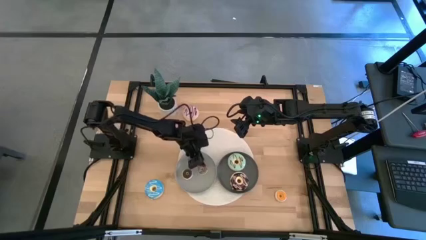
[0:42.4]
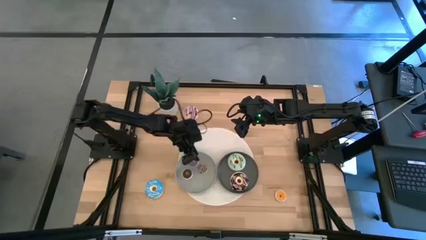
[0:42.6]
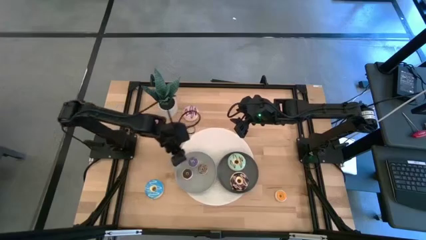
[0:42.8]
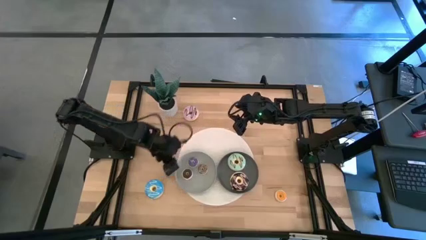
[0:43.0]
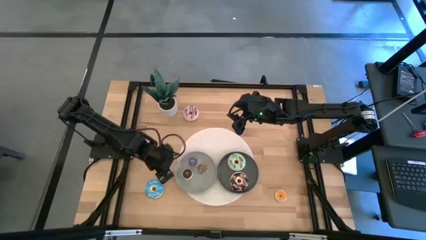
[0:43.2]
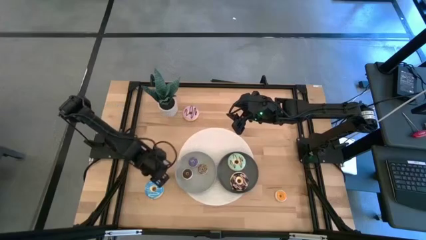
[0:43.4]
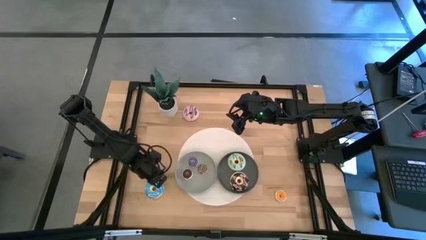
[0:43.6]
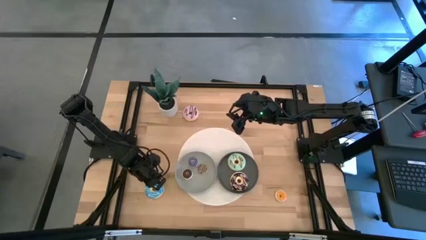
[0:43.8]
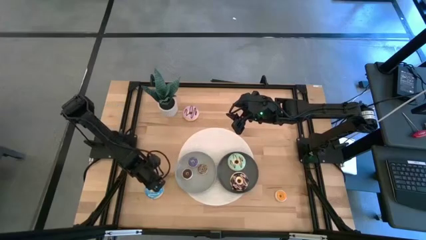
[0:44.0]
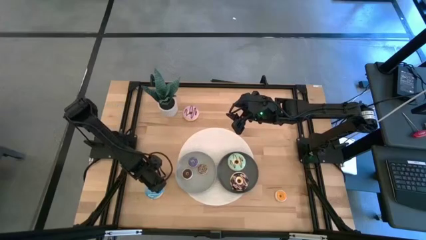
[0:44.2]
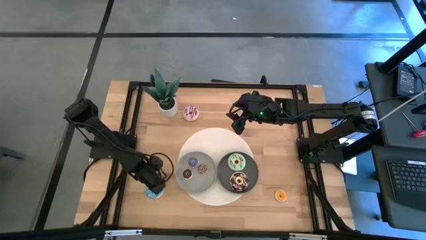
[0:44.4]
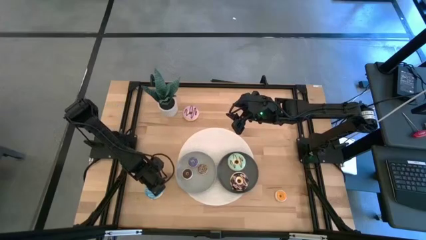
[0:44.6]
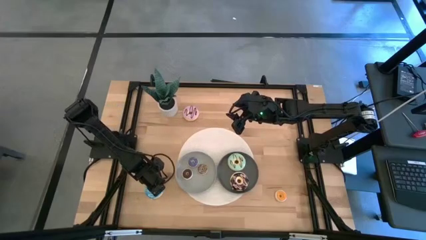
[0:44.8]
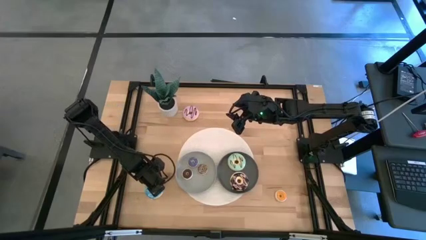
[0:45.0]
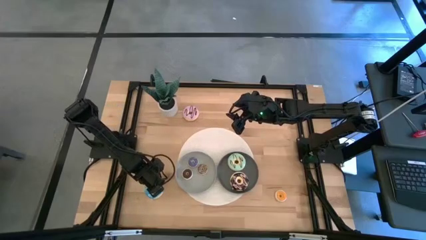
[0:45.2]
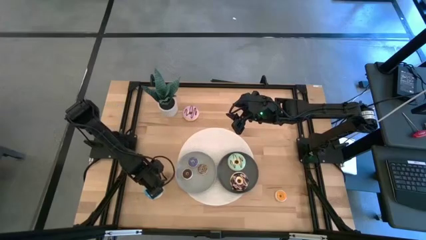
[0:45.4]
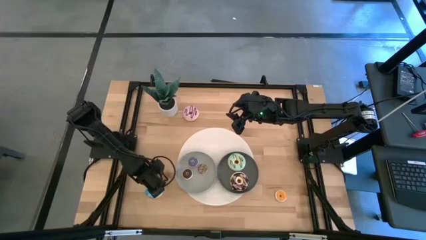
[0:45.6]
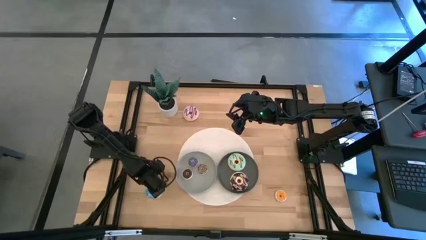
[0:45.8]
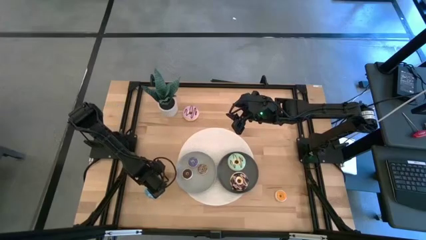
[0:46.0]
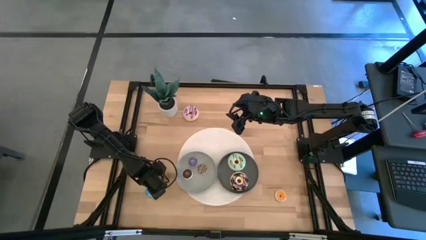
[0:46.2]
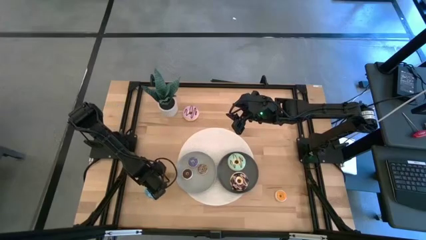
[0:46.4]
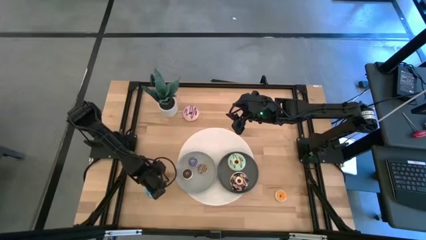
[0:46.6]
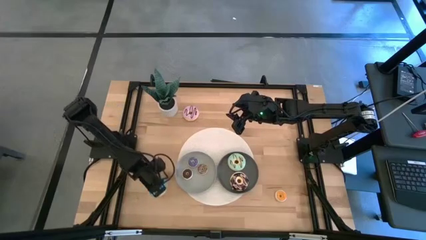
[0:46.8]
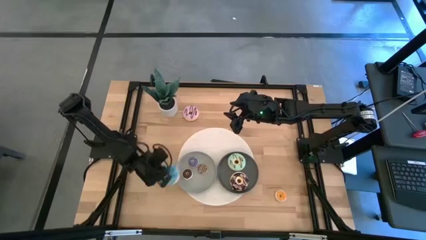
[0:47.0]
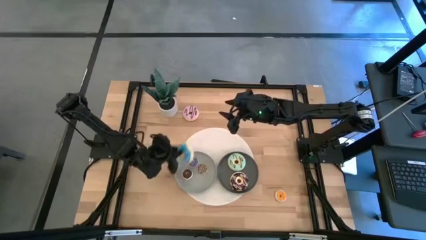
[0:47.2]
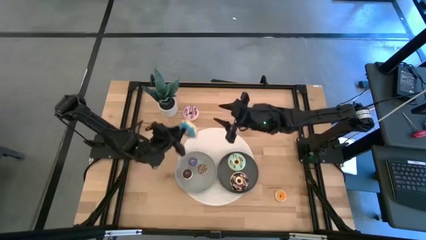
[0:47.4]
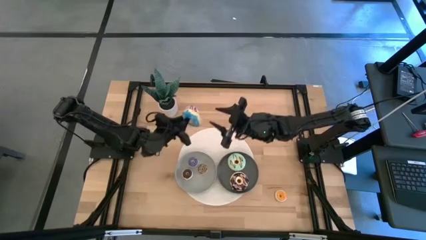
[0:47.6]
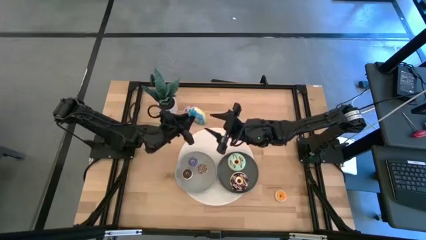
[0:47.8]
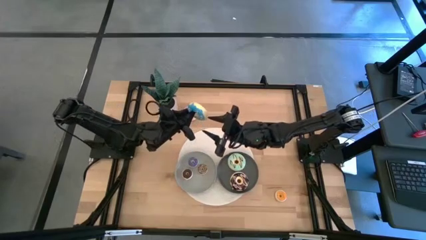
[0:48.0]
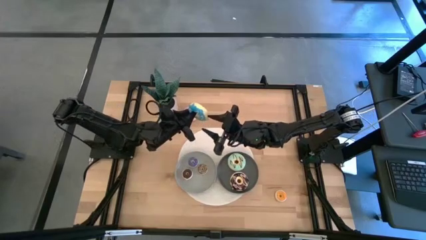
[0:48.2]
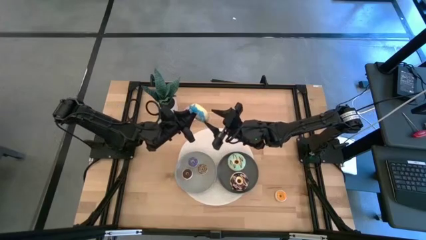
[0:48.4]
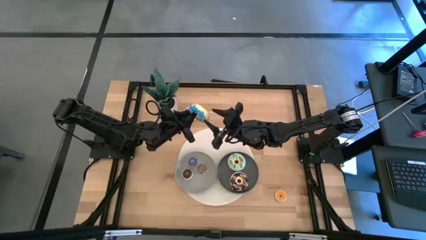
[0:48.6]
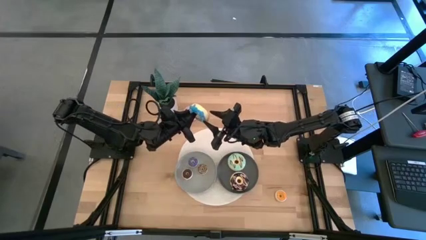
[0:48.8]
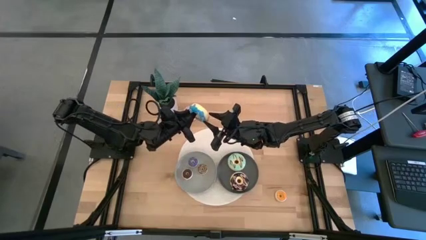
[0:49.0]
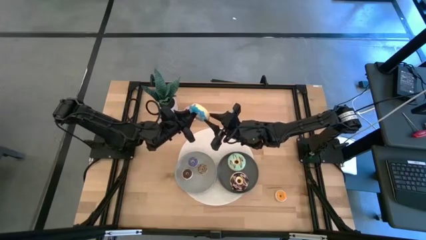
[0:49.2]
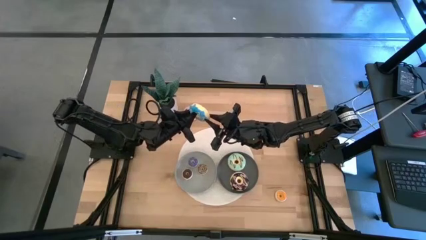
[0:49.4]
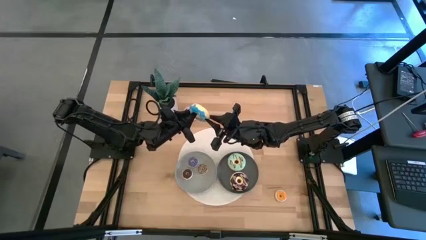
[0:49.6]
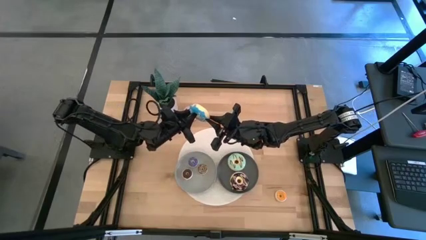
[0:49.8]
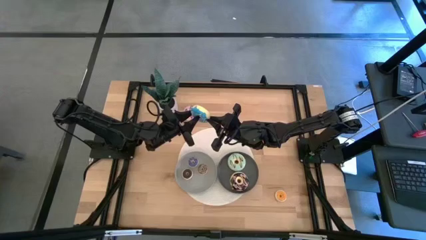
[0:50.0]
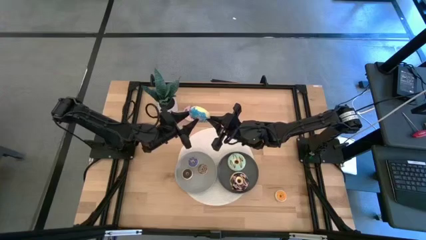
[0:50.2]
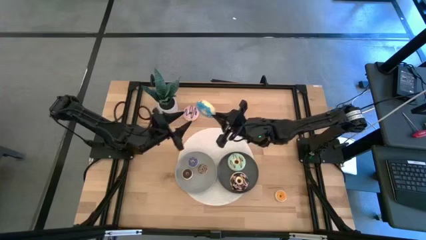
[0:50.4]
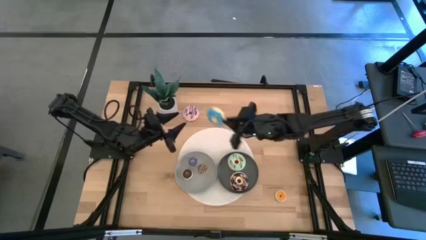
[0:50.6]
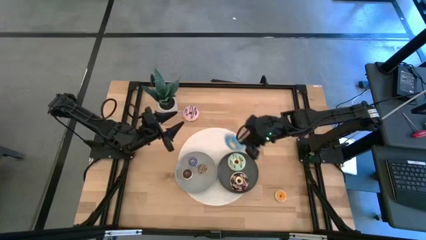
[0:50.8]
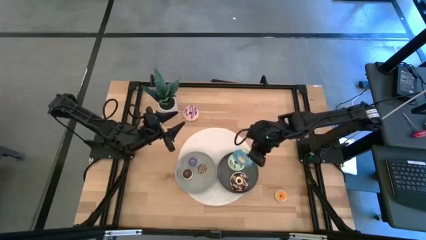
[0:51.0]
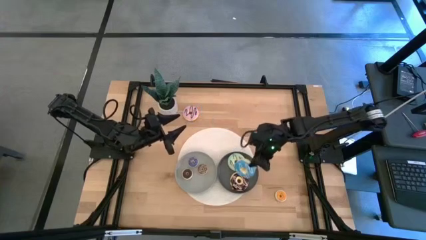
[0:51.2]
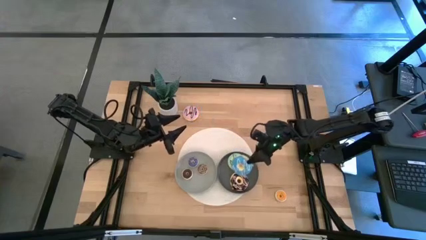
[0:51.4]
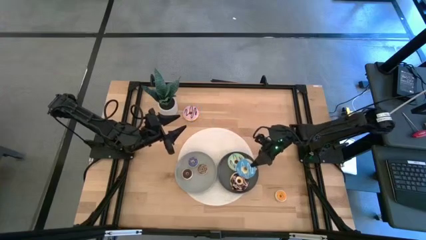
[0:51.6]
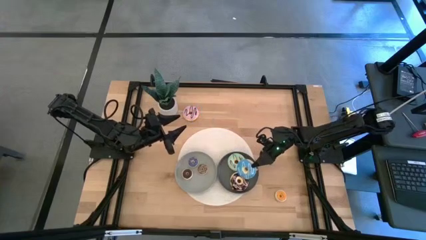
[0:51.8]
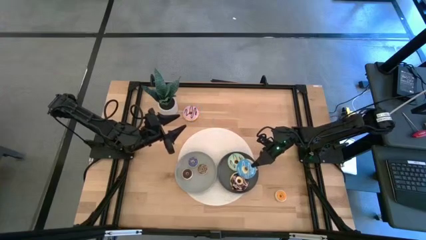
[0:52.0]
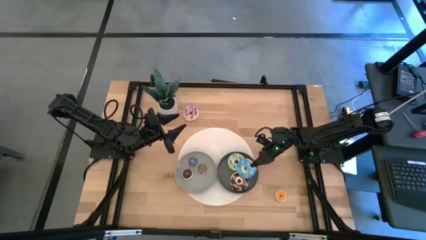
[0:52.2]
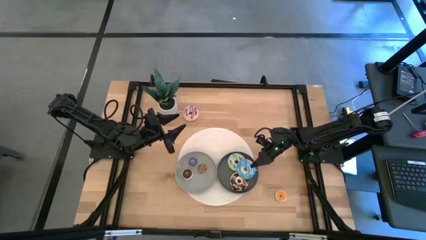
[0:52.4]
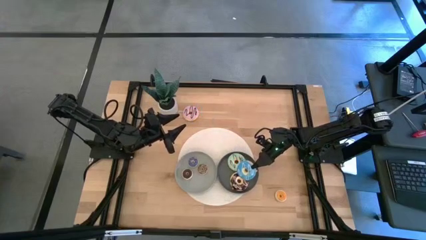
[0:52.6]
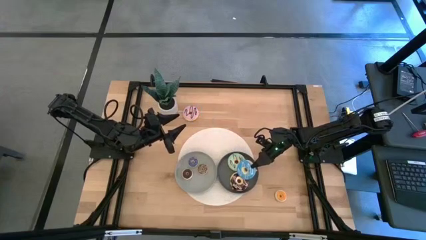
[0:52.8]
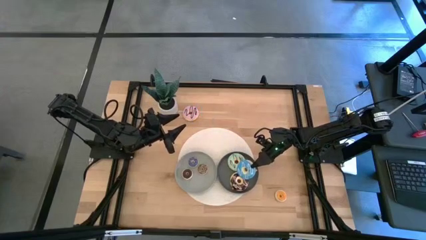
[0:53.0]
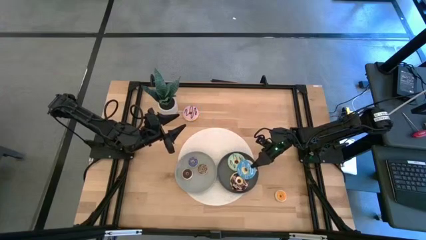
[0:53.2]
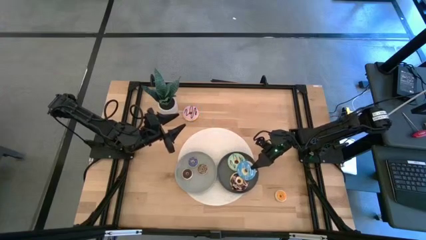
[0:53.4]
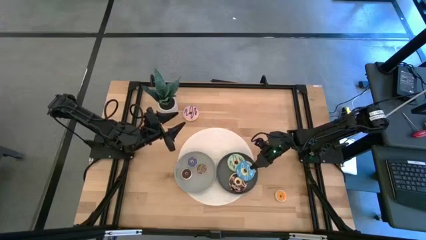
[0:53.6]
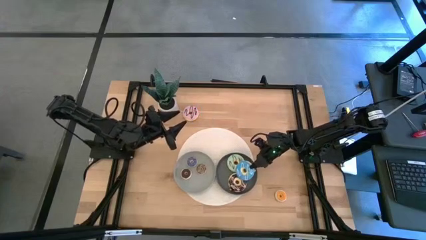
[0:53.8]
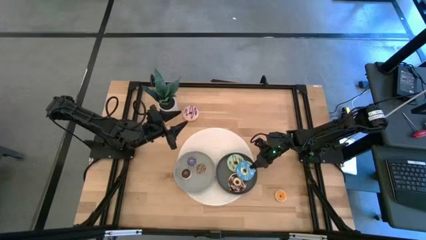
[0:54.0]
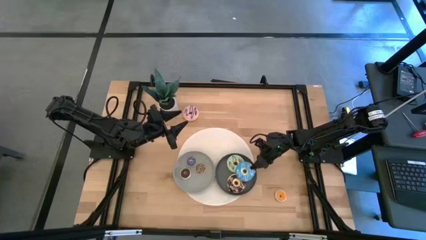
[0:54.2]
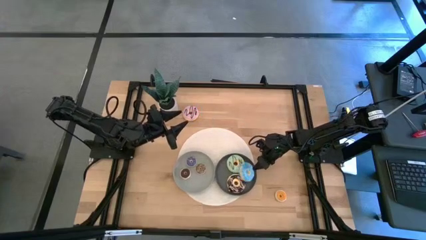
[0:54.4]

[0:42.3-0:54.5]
Task: Pick & Place donuts
Put the large blue donut on the dark gray plate

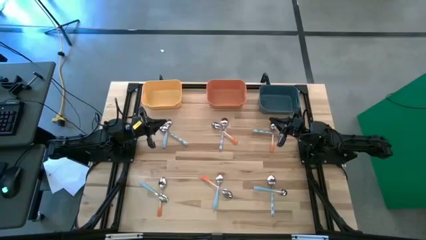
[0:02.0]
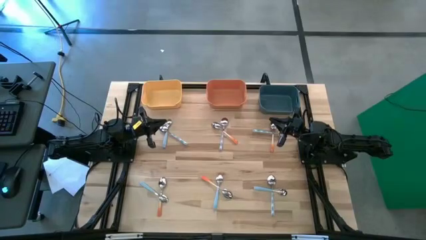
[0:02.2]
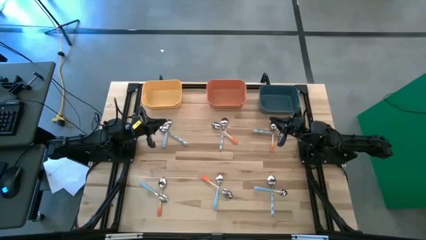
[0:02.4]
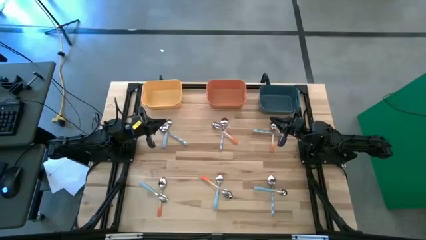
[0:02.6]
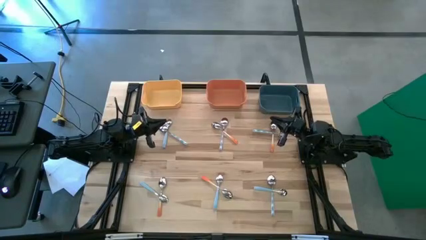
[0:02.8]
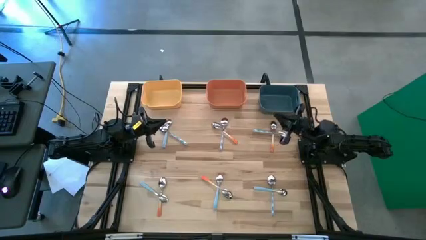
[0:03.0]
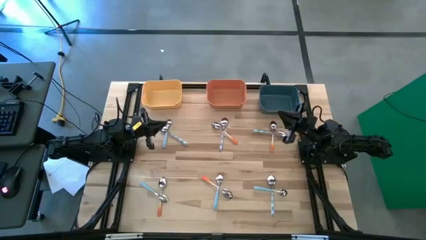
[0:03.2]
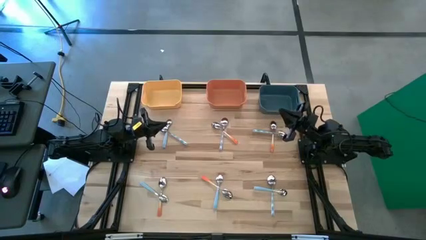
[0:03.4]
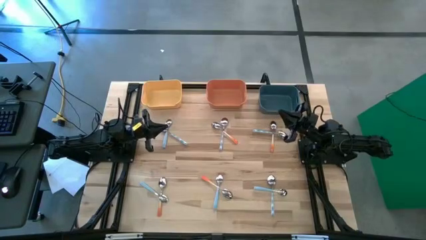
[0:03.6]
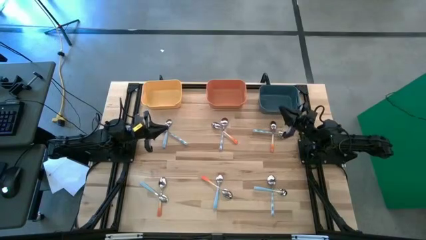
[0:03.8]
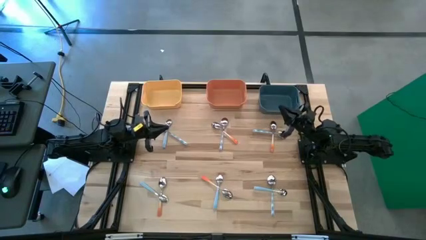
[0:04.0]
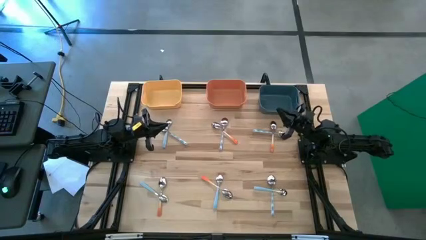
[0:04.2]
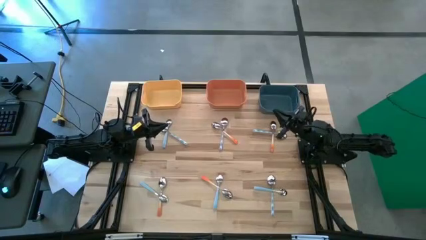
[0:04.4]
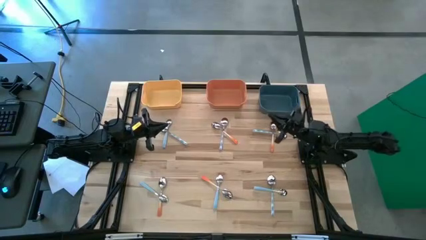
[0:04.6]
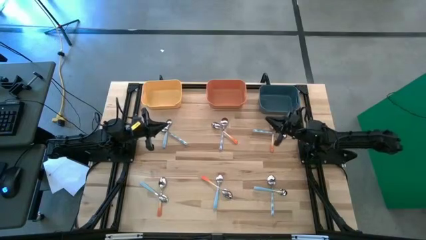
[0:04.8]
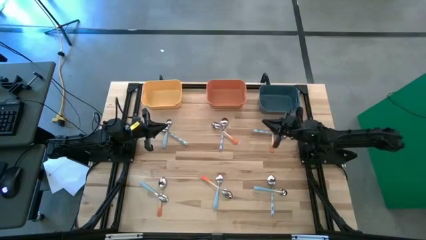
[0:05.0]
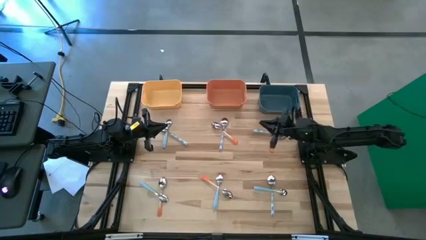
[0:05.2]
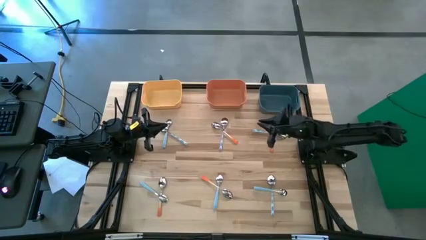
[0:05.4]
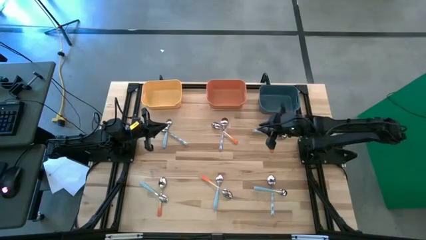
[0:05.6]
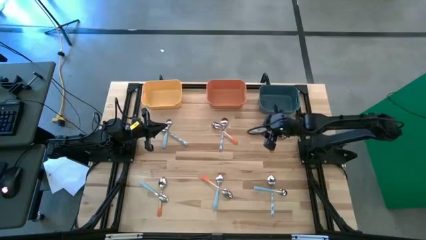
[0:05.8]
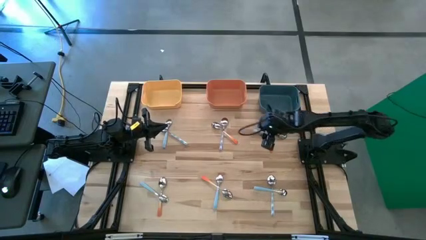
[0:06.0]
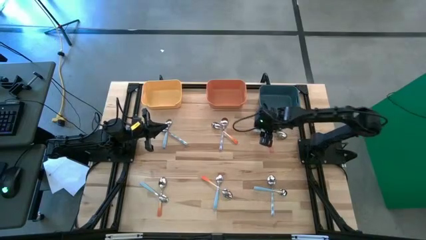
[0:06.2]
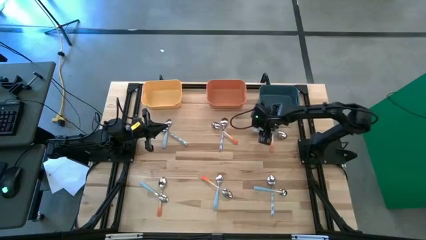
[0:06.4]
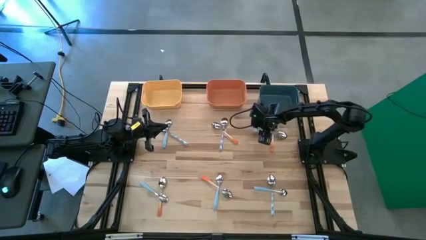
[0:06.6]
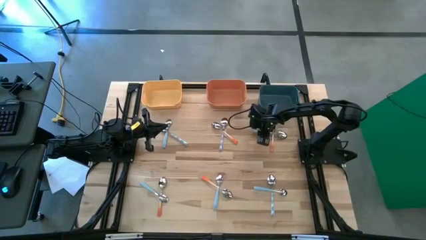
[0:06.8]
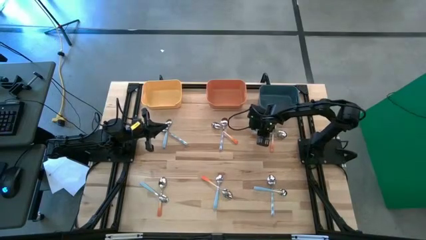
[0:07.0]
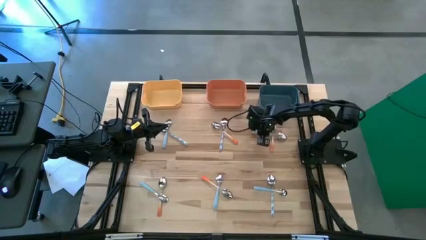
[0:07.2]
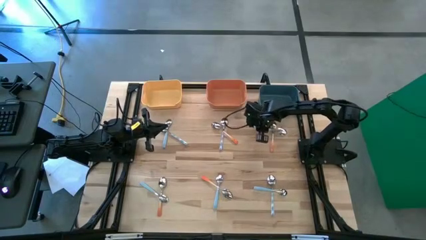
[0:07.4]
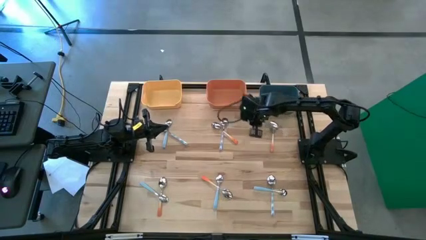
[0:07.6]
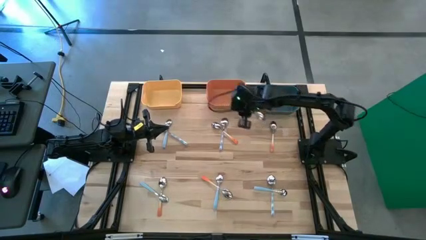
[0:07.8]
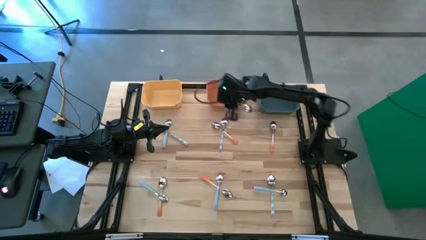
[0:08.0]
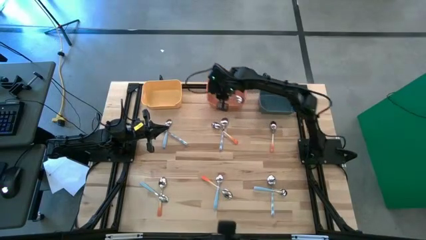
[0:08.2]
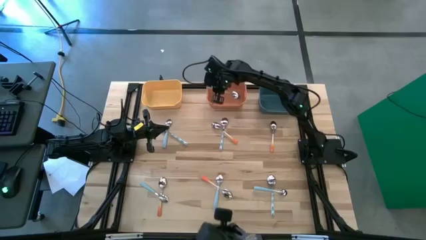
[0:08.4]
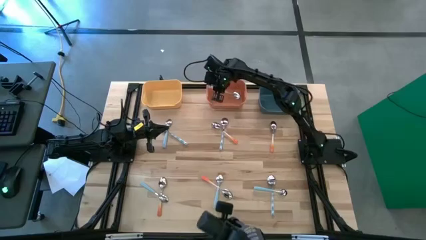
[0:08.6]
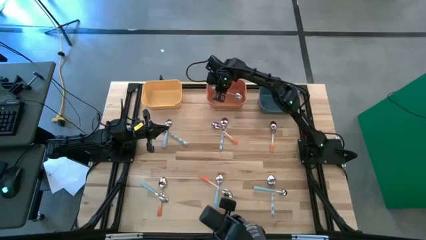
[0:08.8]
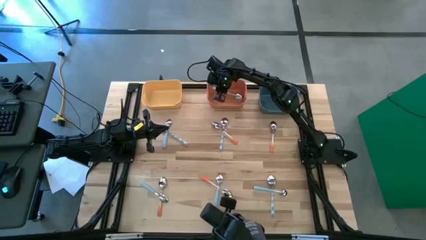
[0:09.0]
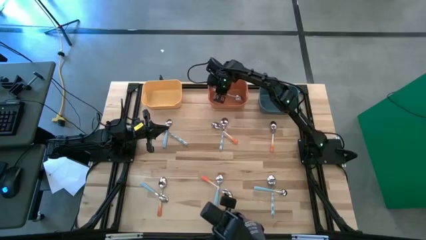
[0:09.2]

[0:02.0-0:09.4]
Task: Sort silverware by color (type)
Put the white spoon into the orange bin
